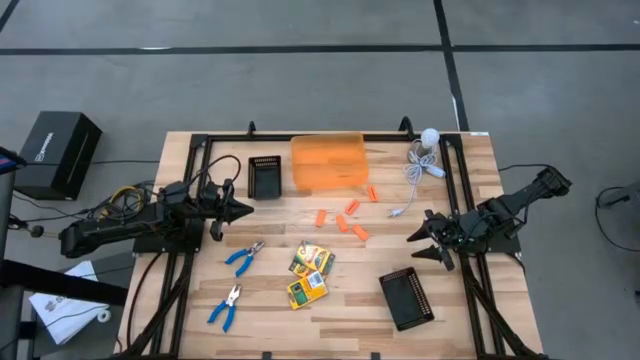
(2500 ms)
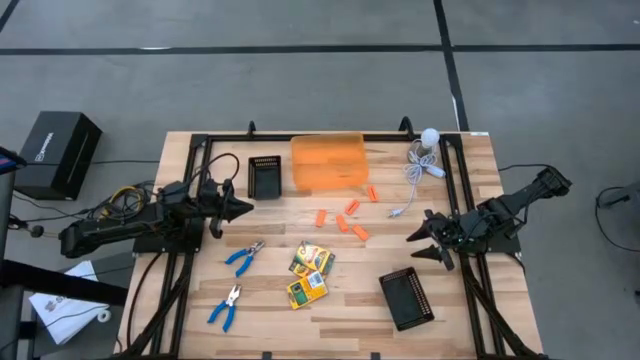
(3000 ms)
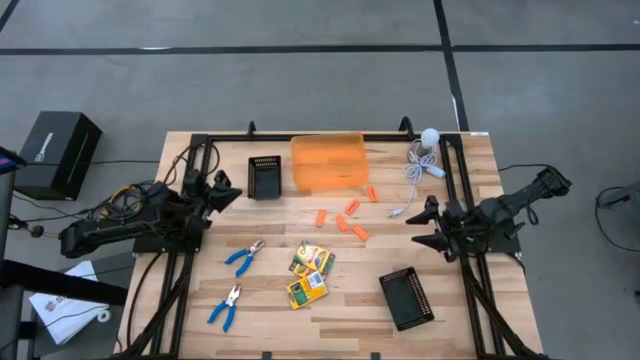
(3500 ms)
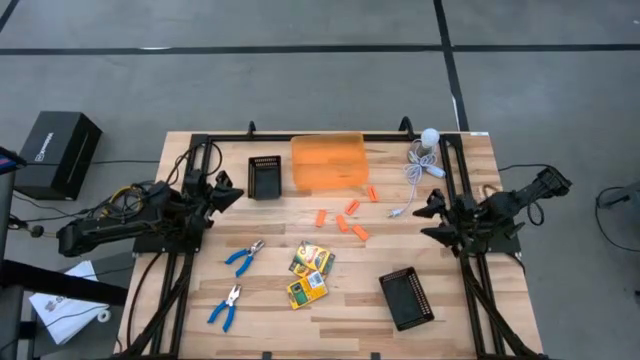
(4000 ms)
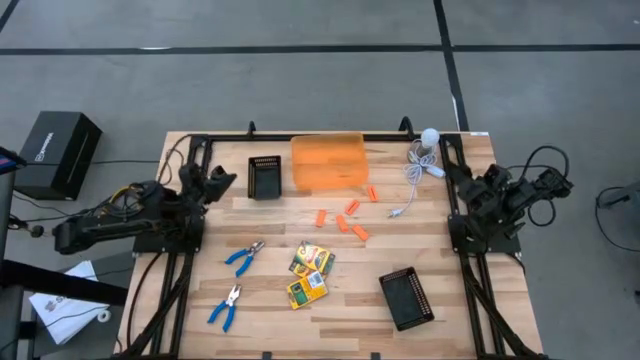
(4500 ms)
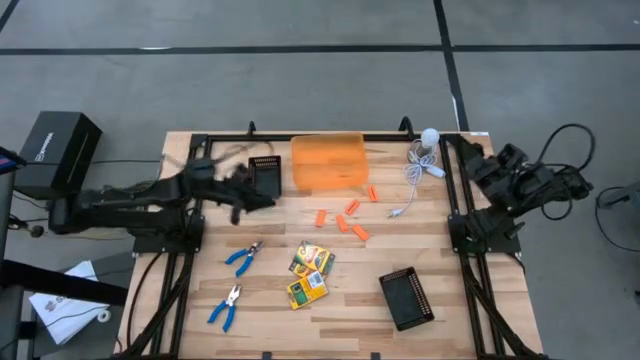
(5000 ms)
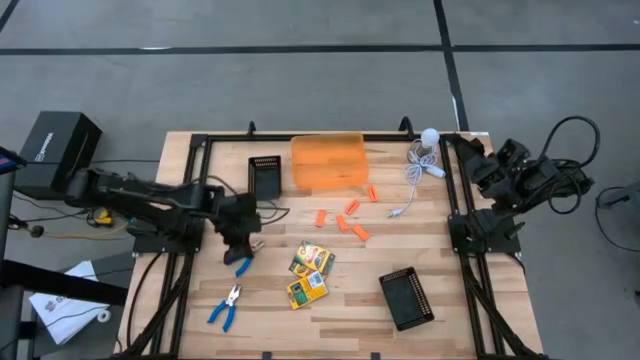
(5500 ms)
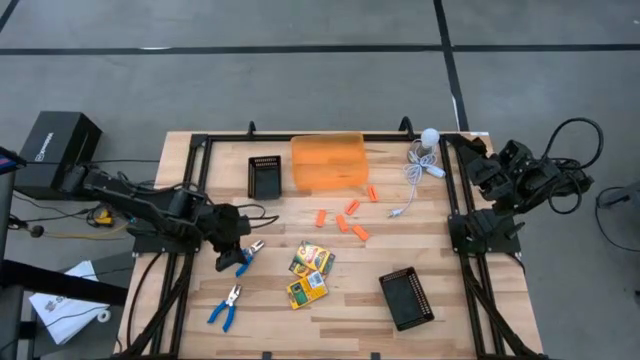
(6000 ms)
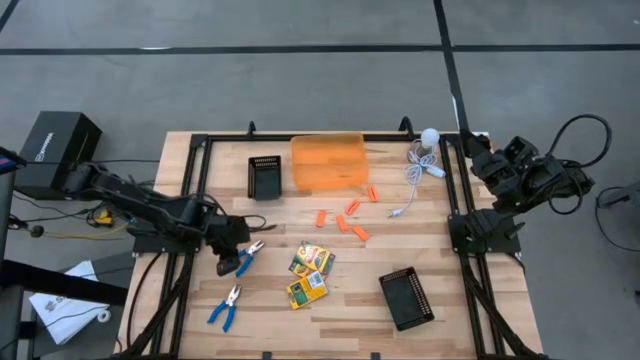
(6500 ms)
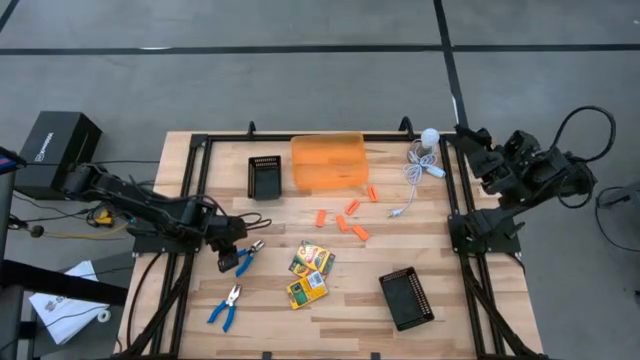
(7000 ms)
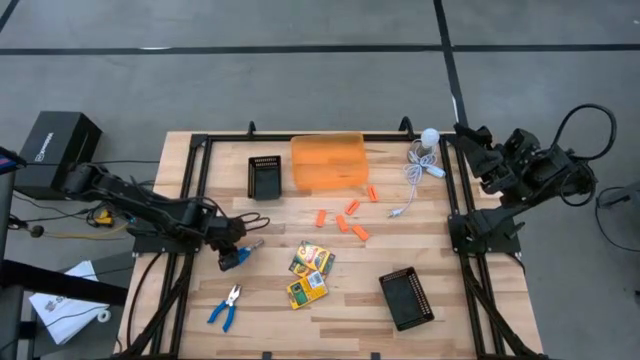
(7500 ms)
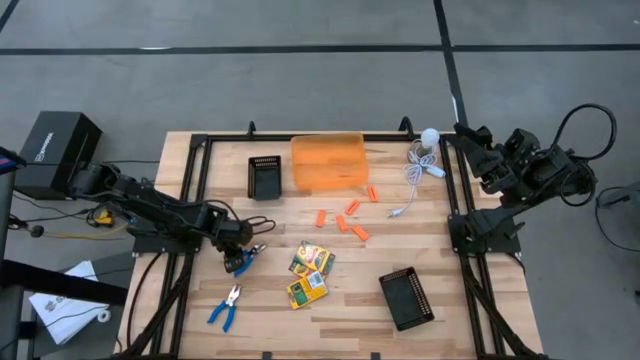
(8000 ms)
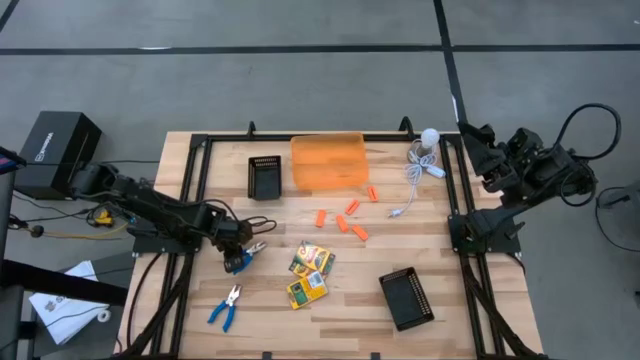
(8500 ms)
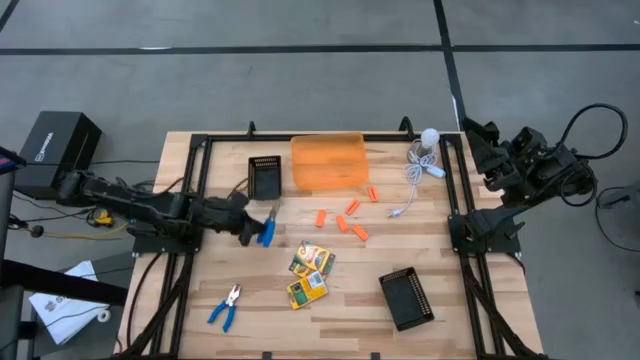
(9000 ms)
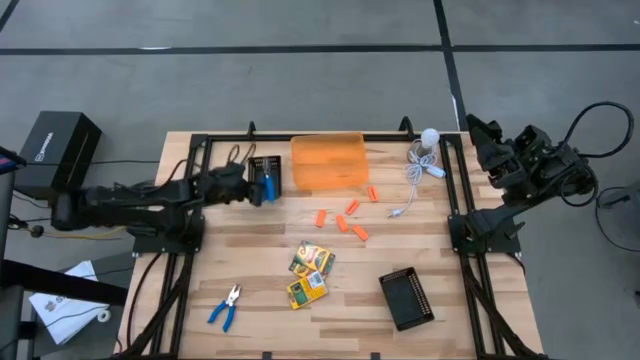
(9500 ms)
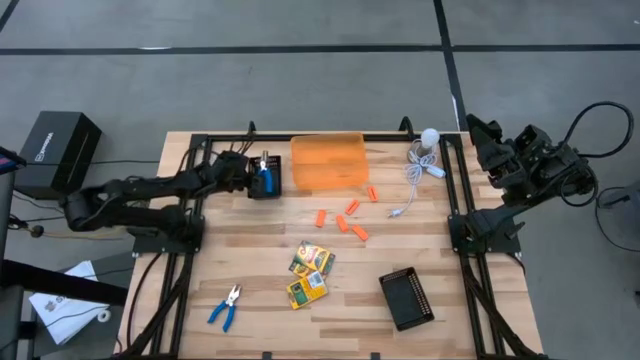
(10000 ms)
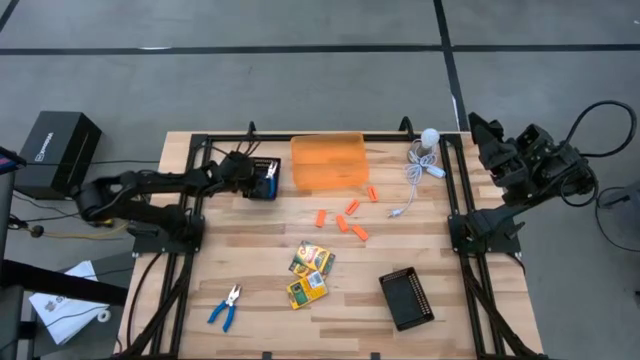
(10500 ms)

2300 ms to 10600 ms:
Task: Pick & Place School Supplies
Put the blue puncher into the top black bin

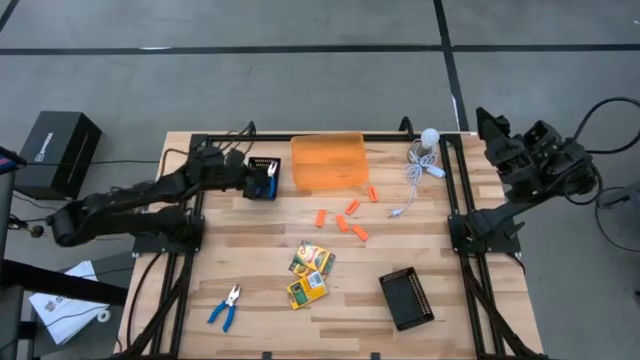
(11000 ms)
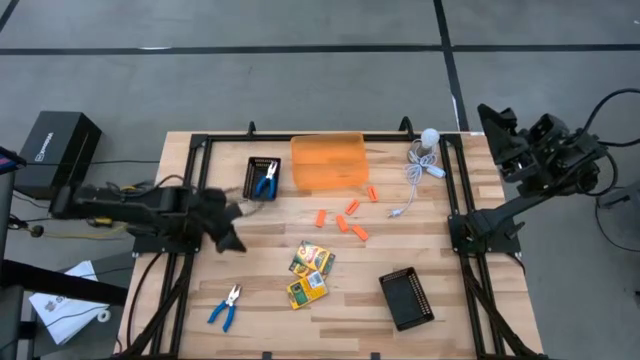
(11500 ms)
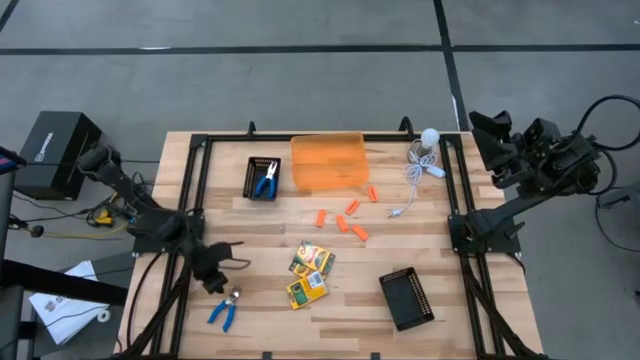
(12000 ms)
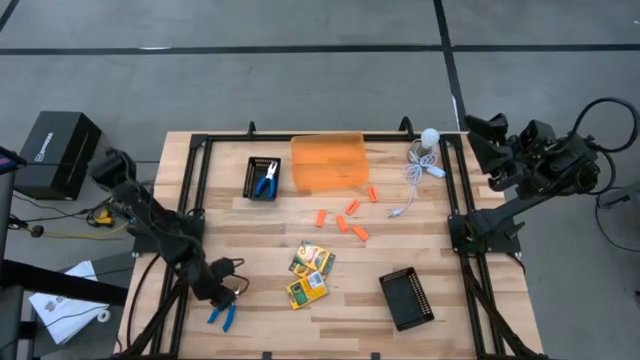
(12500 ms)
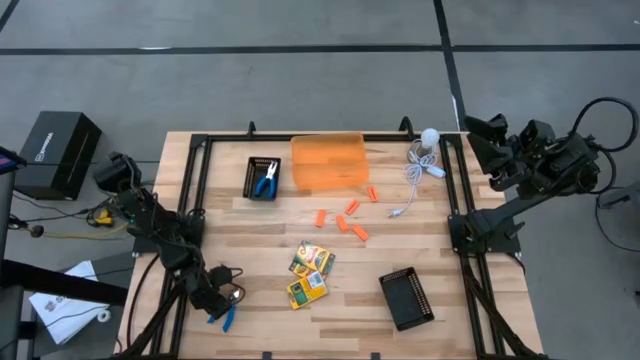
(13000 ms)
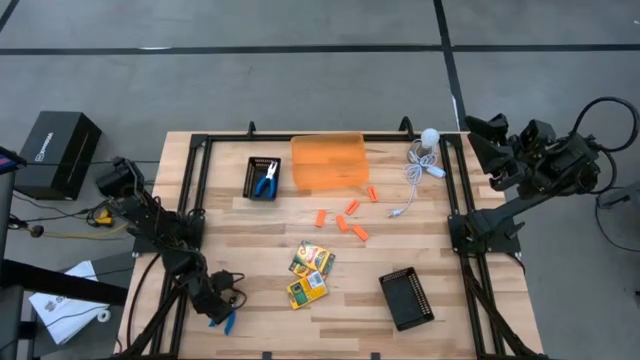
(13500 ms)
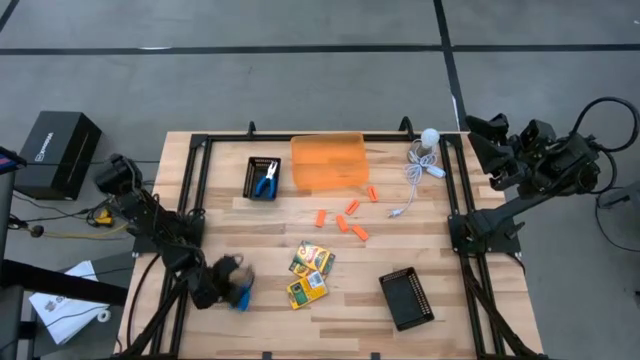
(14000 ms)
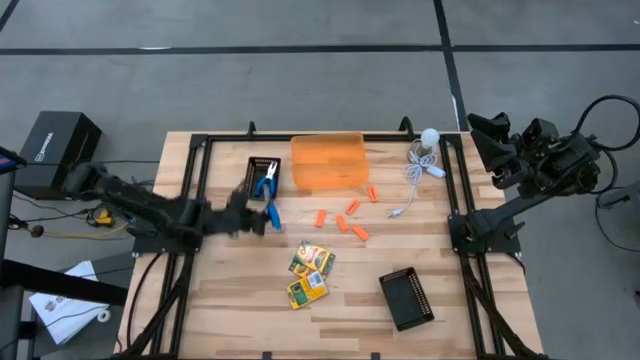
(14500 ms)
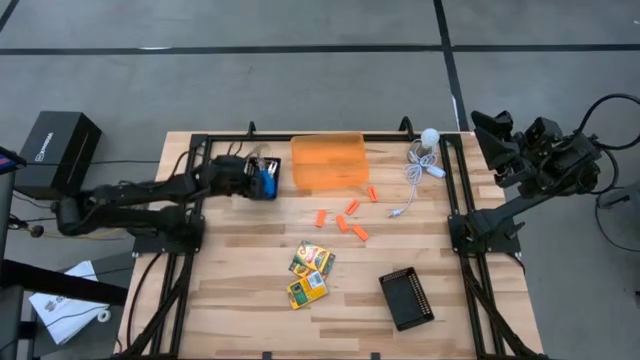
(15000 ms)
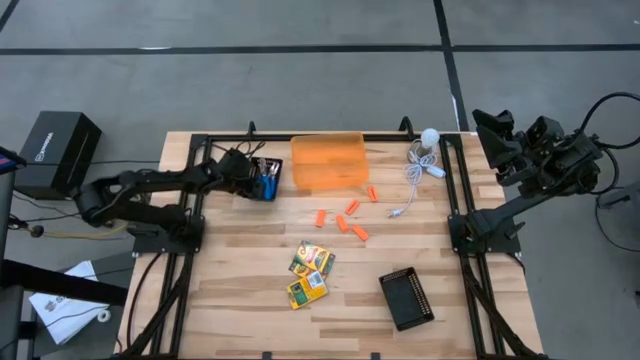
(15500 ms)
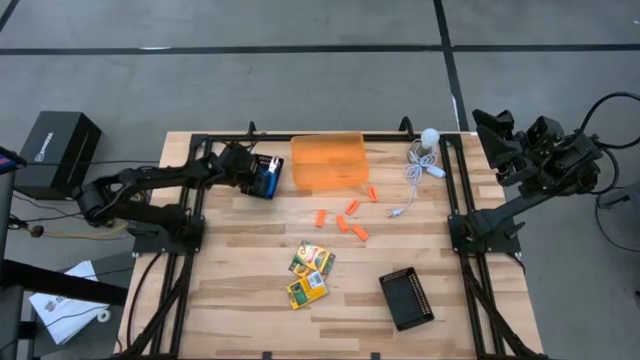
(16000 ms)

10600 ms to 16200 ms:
Put the blue puncher into the top black bin

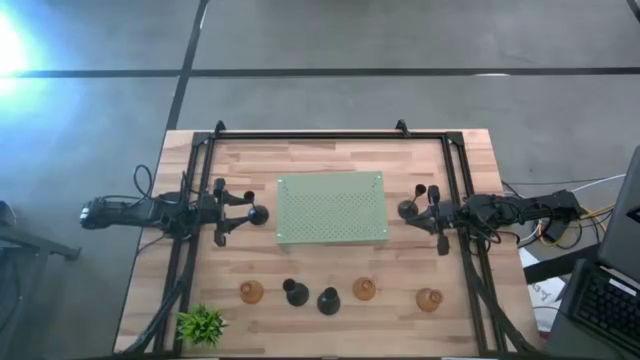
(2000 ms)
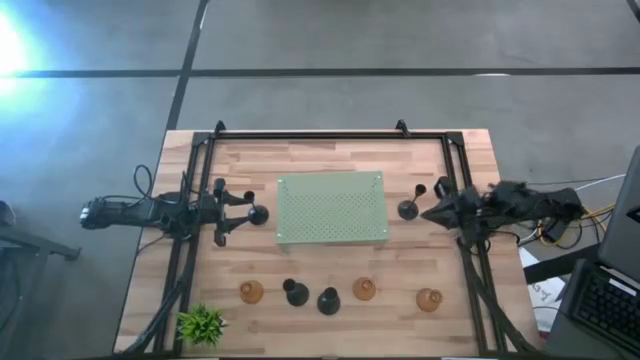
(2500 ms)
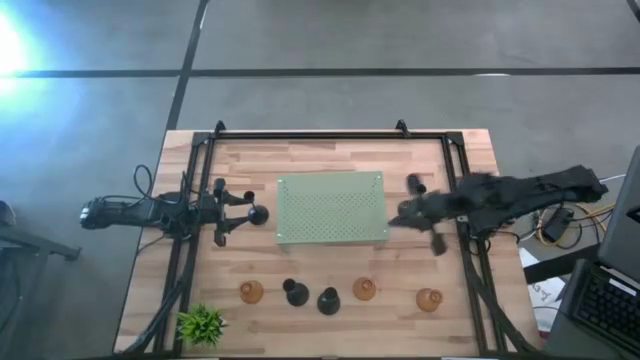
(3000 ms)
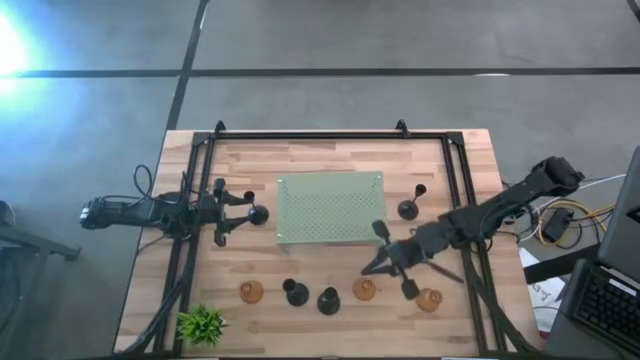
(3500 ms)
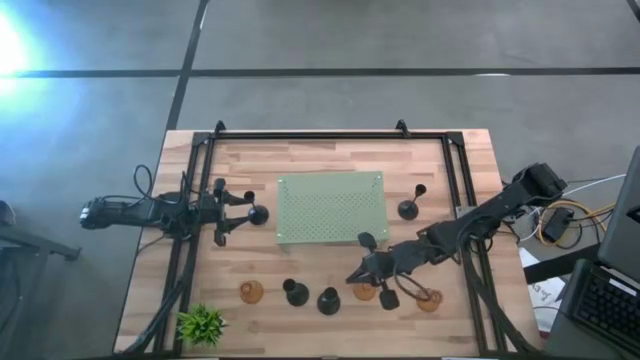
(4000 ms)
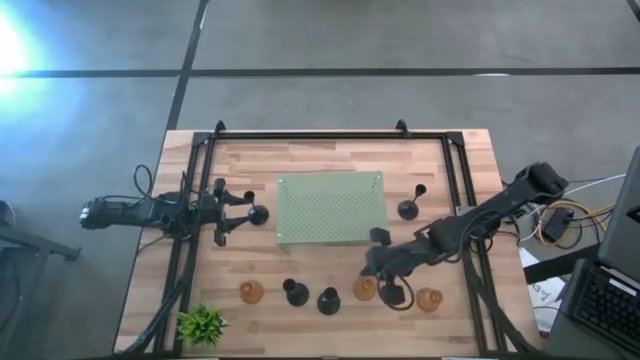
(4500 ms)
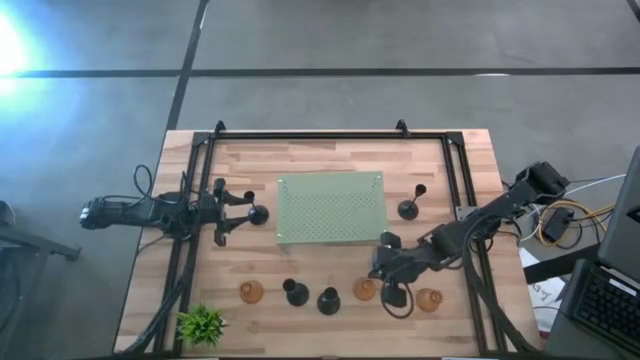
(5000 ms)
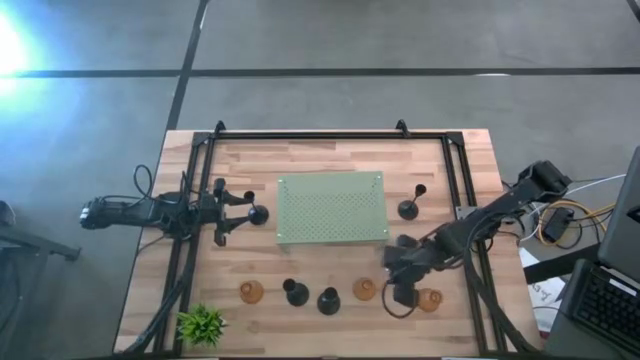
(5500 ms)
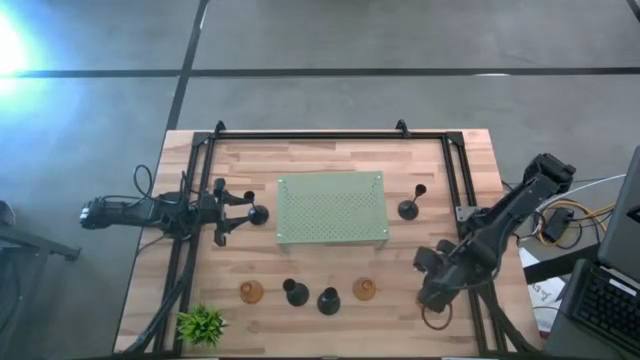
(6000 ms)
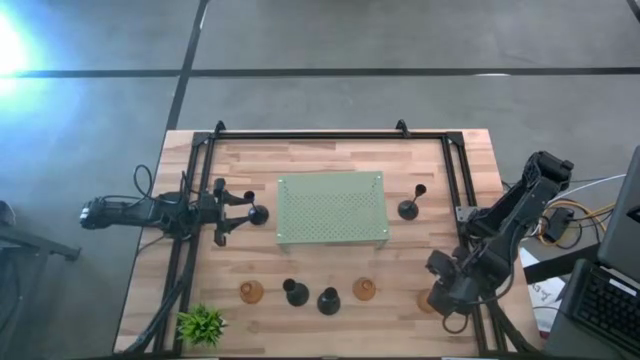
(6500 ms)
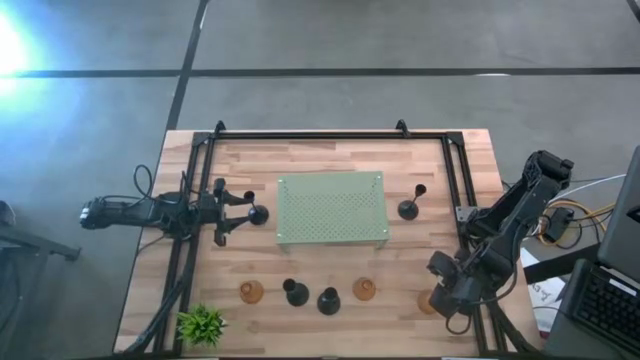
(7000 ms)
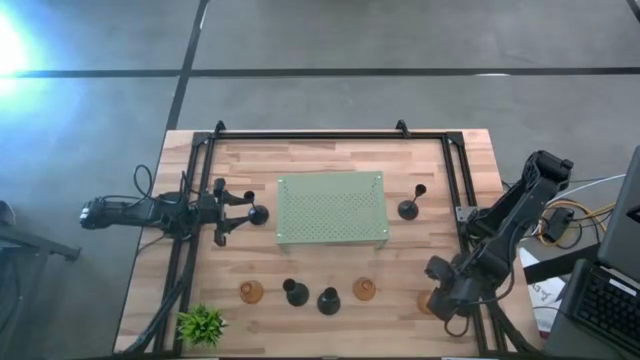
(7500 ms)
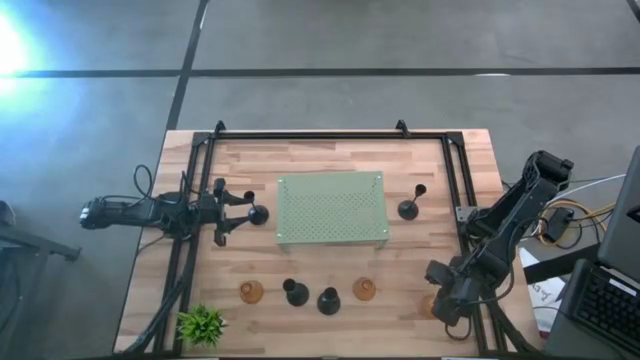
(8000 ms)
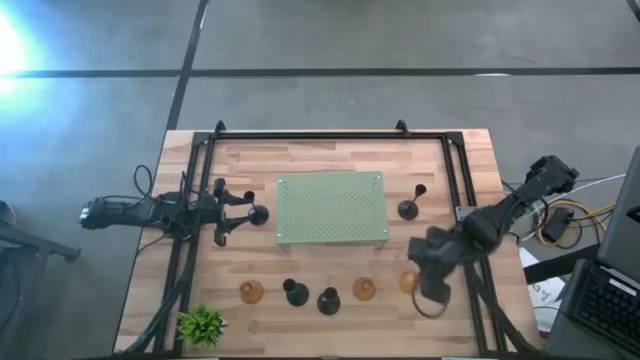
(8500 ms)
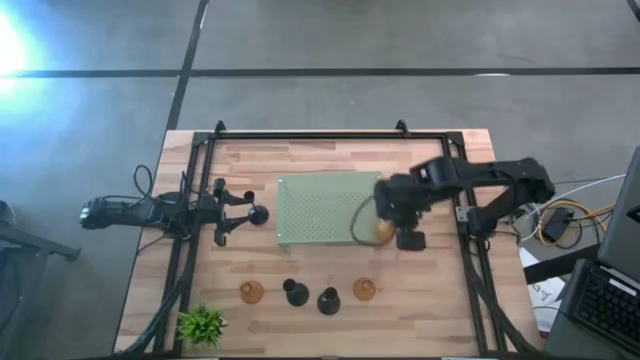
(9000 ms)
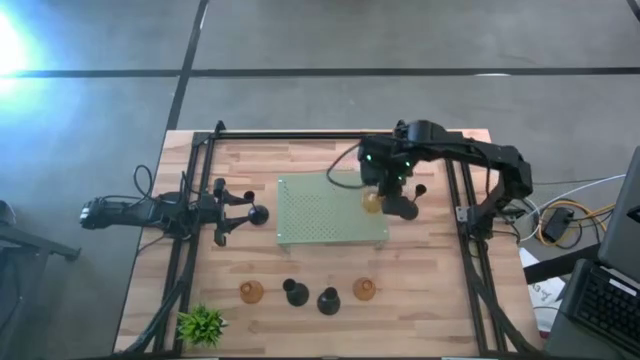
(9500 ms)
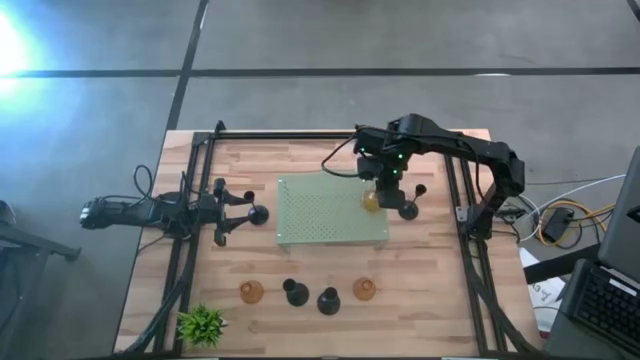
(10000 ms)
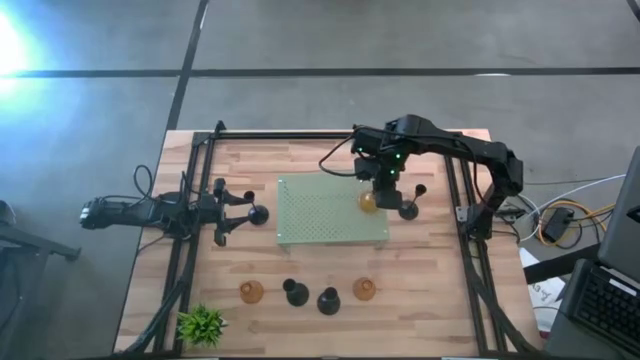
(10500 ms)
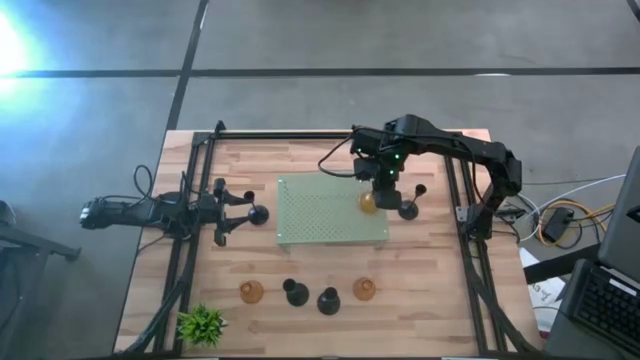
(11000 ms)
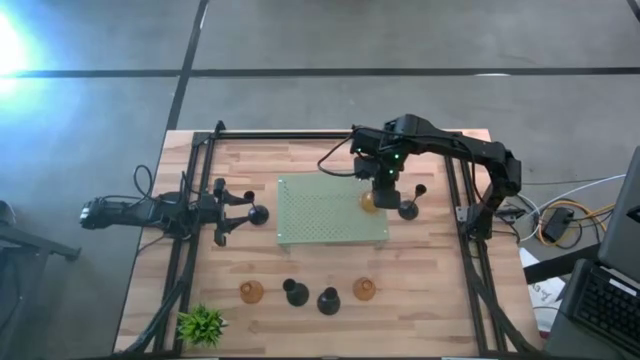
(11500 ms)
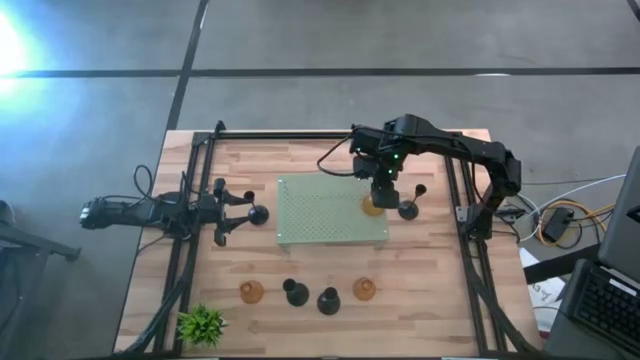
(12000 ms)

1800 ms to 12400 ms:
Task: Pick & Place candle stick holders
Put the yellow glass candle holder on the shelf
